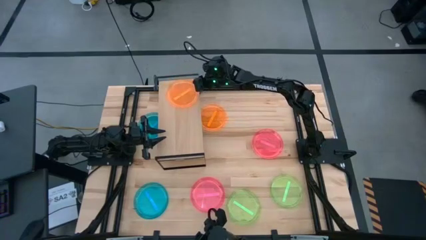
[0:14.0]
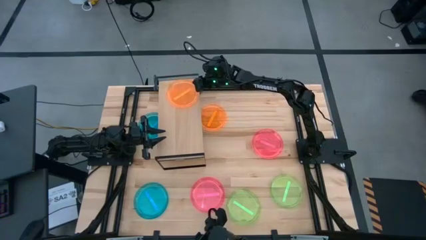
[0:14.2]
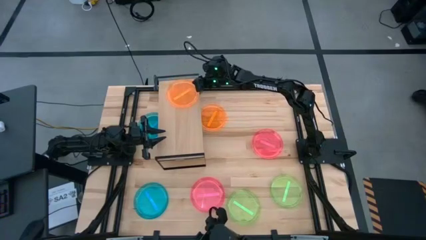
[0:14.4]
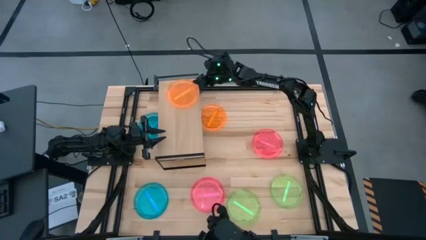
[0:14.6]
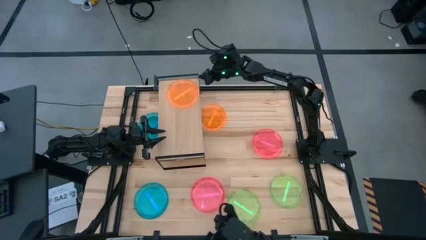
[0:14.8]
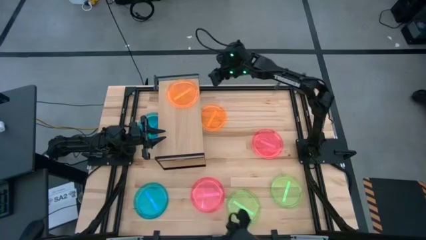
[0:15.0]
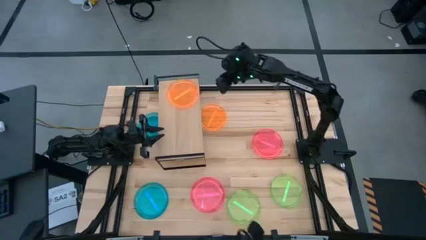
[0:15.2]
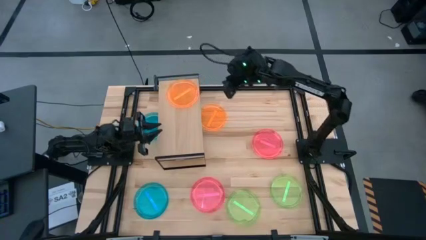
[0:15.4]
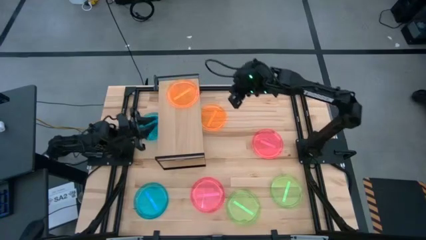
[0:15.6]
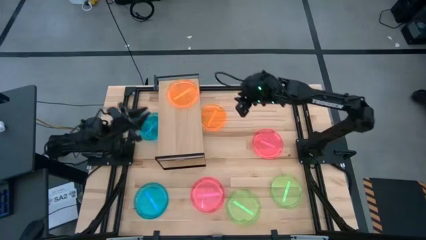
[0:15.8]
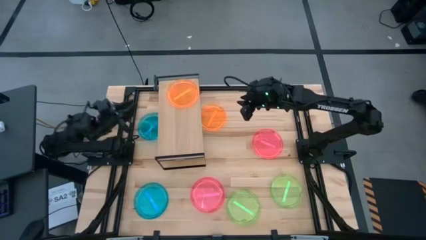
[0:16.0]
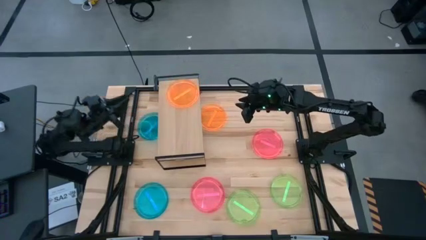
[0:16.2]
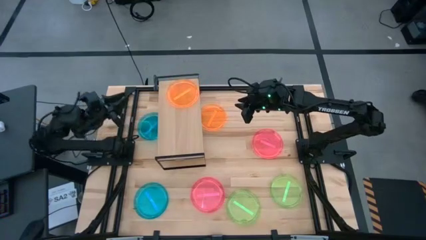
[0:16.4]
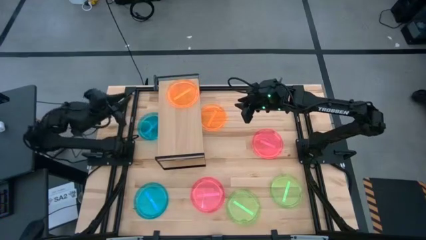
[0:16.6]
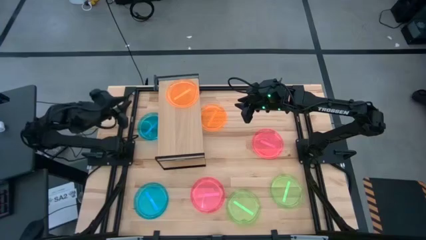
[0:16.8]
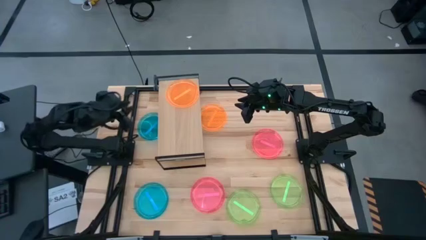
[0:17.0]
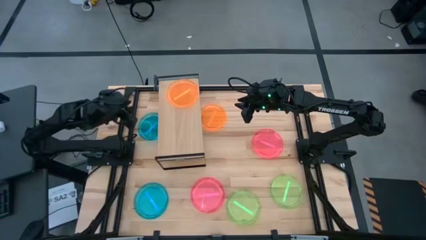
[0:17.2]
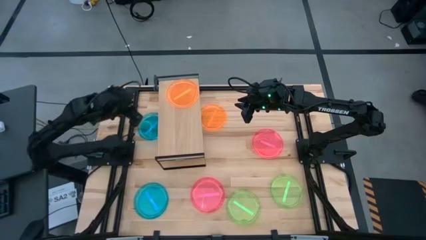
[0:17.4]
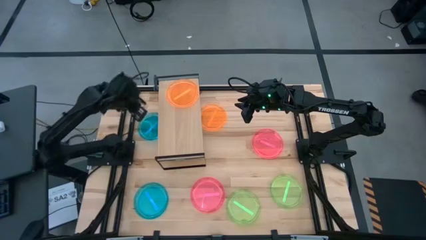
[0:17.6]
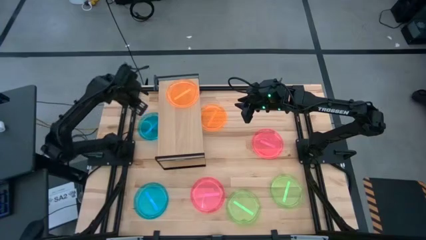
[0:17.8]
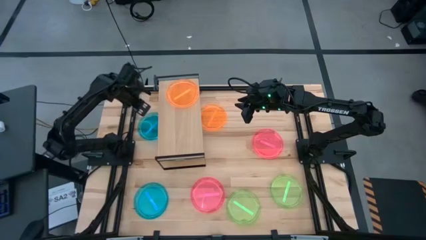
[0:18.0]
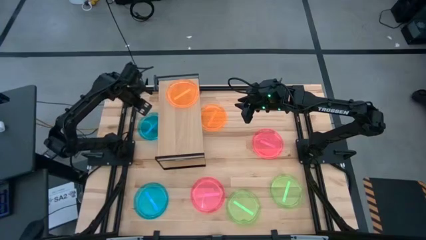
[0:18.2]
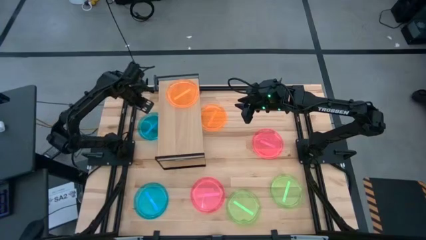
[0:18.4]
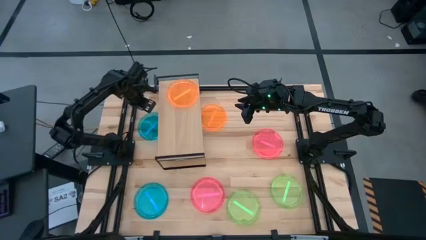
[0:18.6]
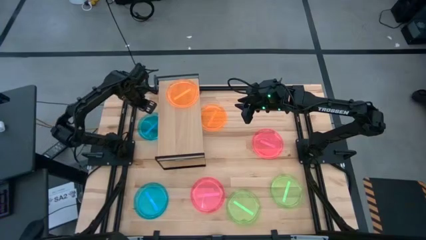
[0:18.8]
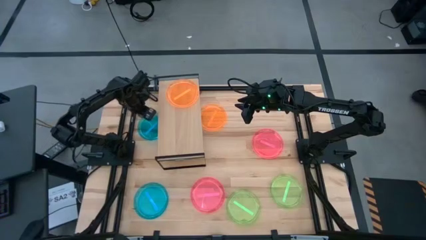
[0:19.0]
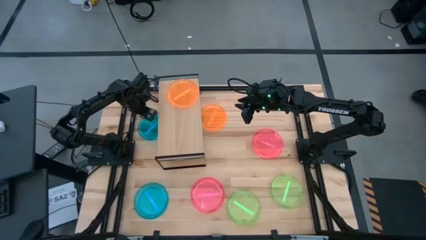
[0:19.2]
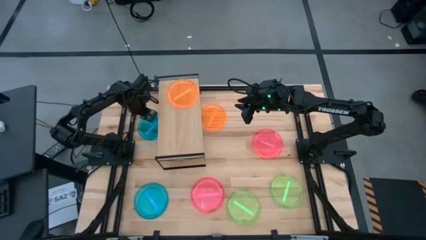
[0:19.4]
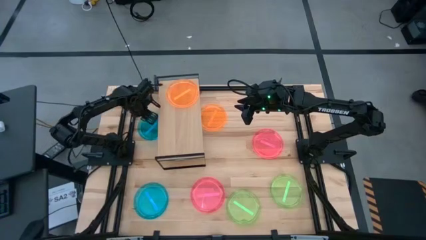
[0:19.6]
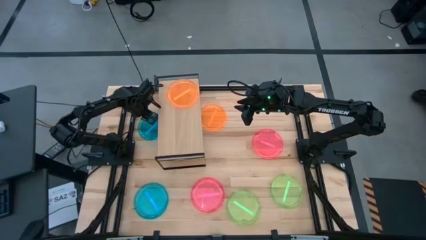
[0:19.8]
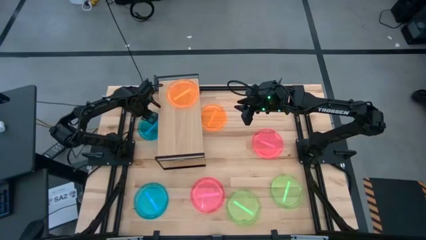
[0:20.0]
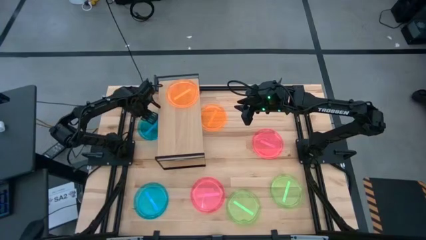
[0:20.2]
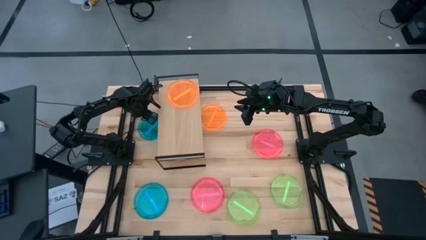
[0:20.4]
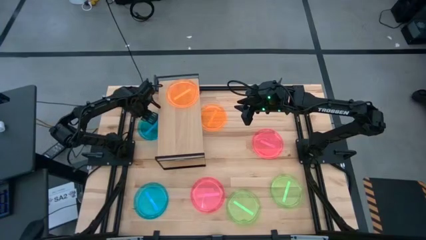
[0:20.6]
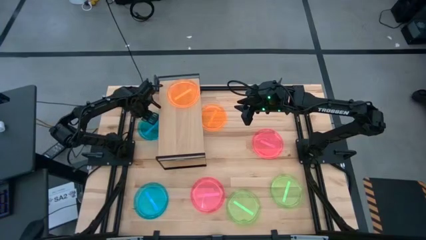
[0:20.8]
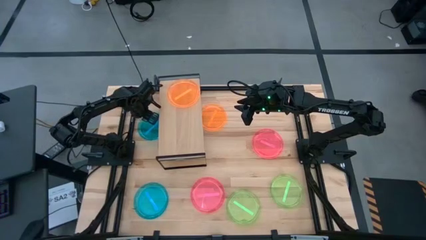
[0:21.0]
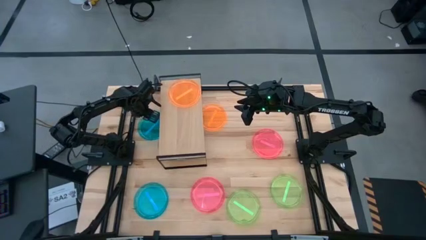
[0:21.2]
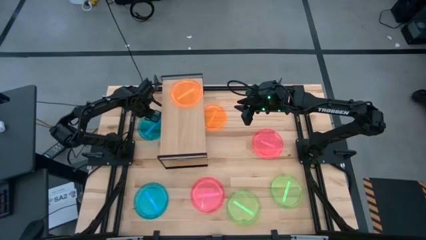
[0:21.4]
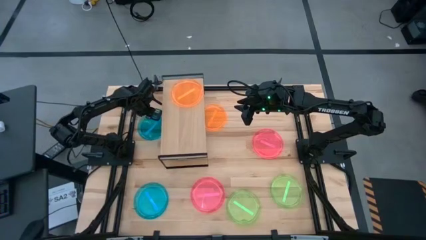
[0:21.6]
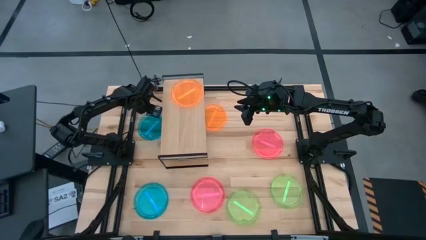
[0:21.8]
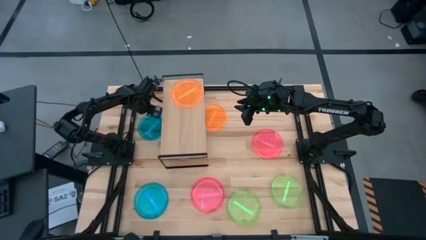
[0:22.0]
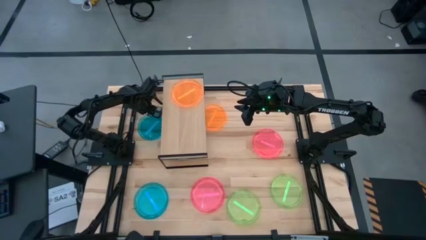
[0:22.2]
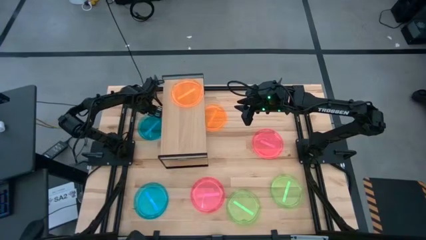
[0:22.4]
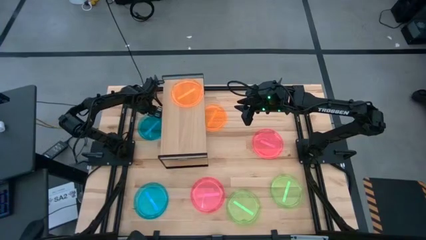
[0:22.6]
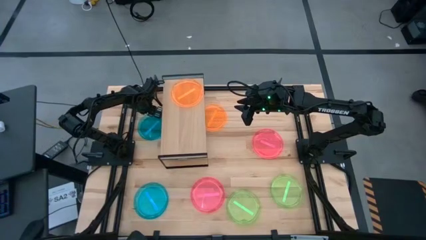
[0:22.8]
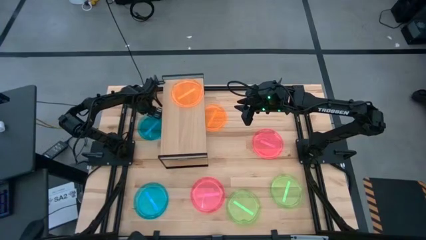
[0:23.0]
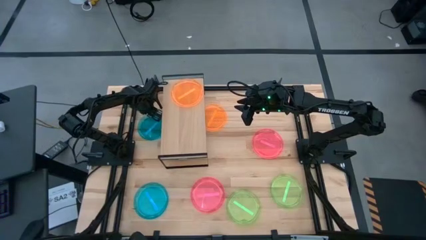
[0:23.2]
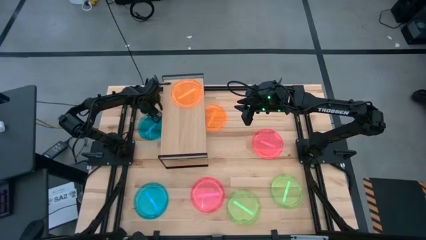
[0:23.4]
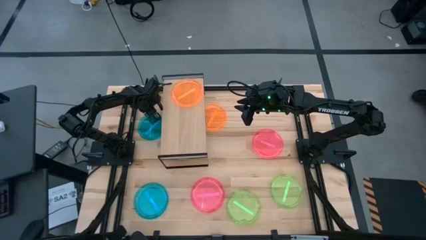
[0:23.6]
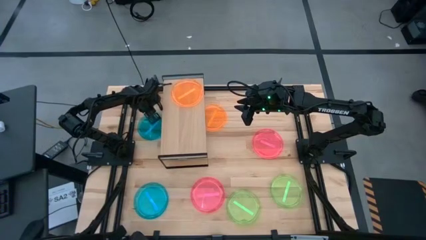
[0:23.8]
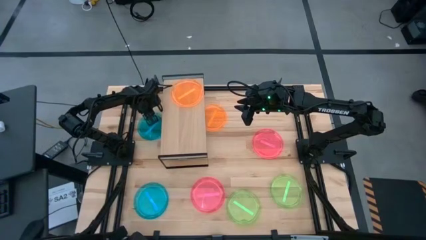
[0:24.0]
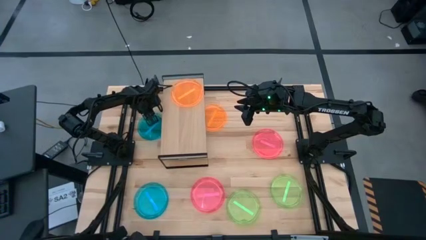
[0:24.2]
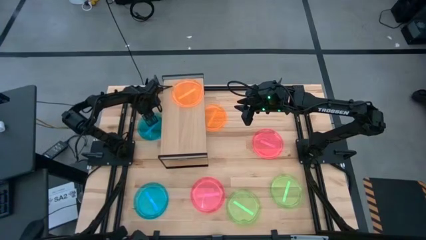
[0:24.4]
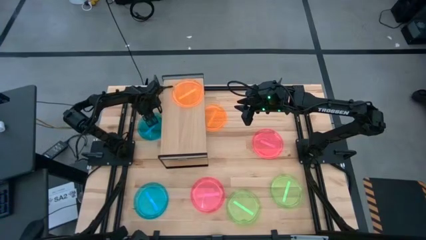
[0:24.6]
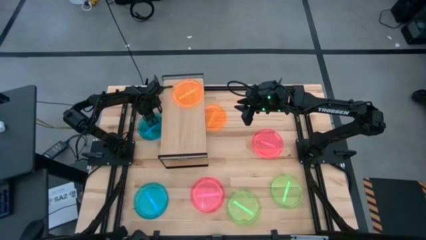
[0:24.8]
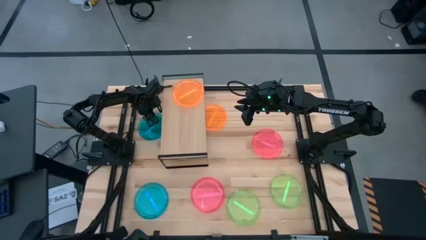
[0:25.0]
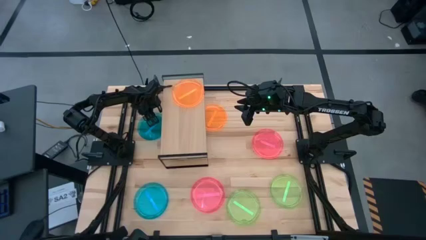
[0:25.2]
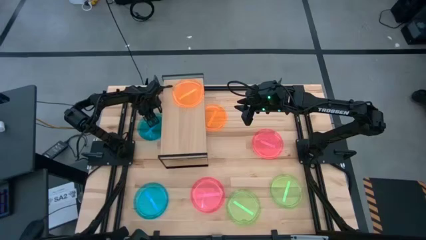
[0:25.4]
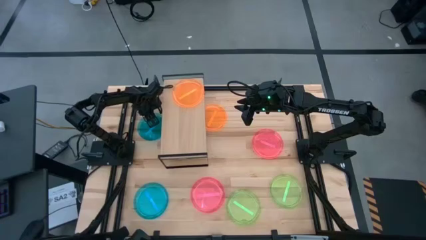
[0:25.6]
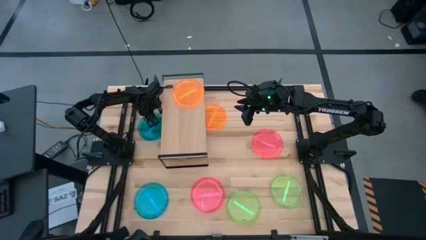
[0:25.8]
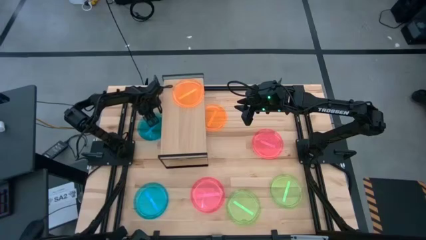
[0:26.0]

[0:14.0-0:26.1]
Task: Place and stack plates onto a shelf
Put the top blue plate on the shelf
